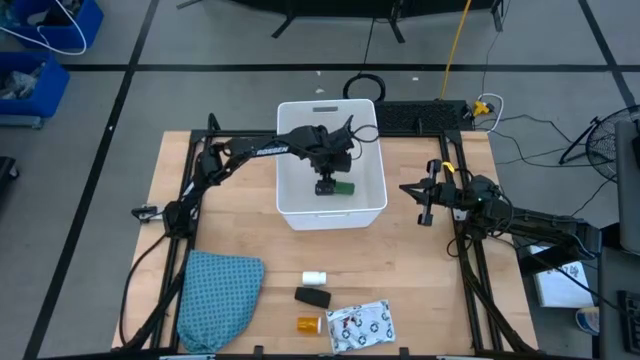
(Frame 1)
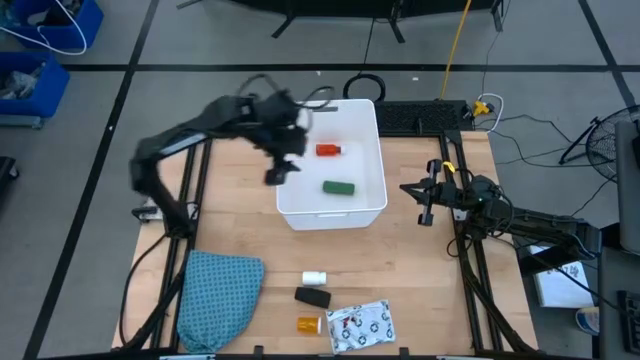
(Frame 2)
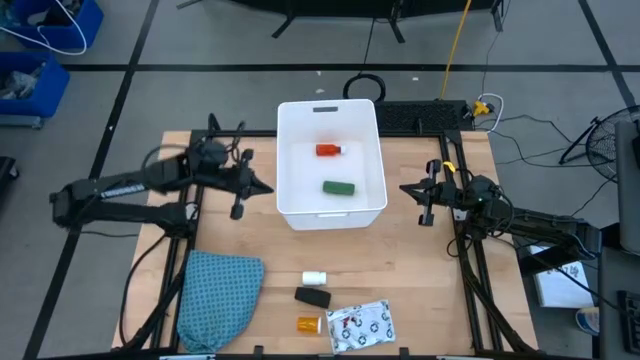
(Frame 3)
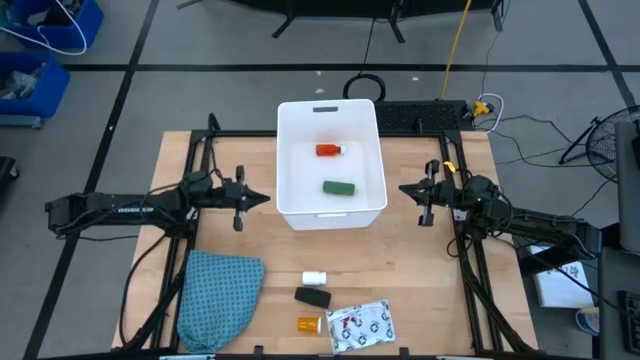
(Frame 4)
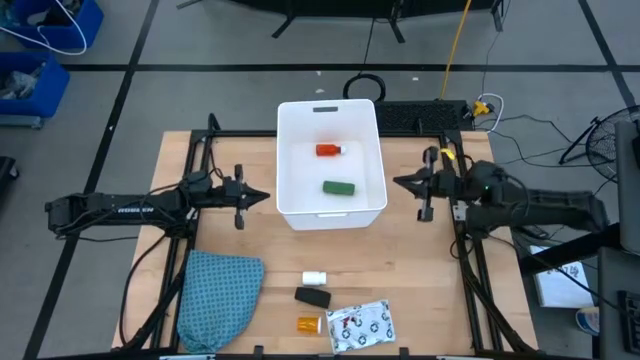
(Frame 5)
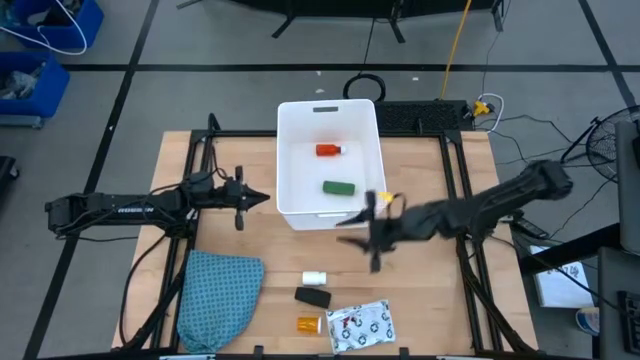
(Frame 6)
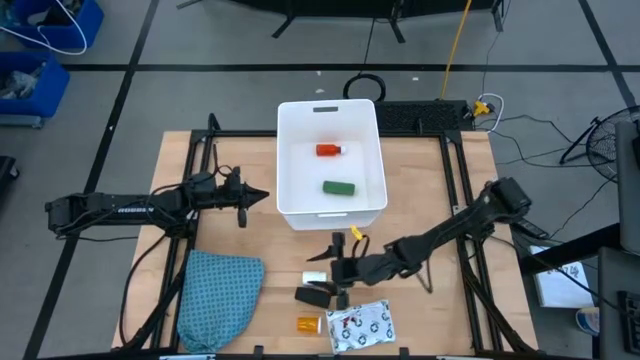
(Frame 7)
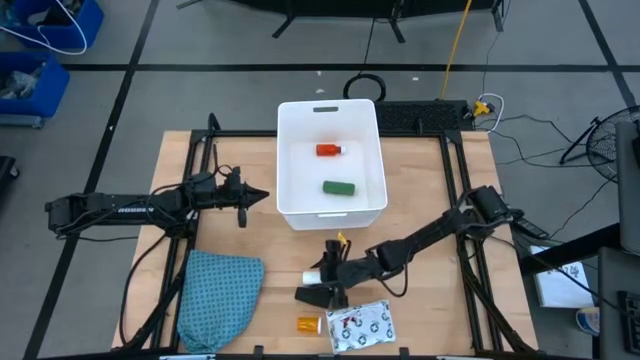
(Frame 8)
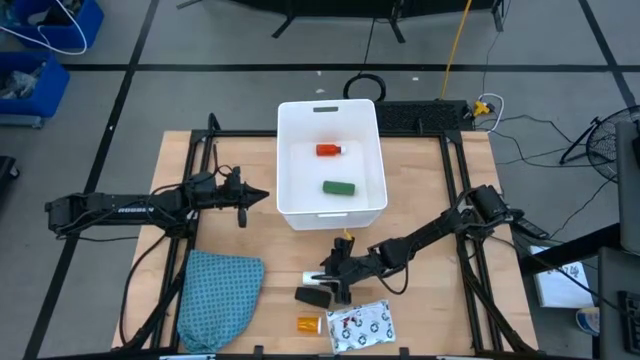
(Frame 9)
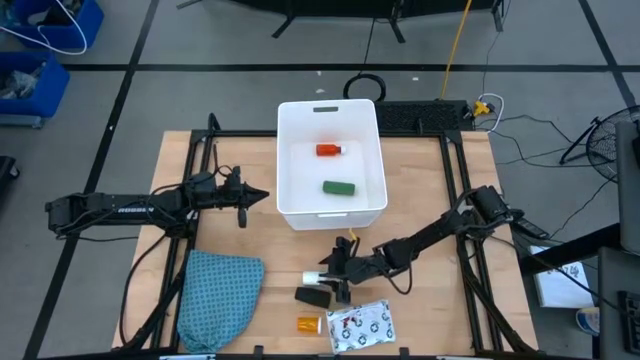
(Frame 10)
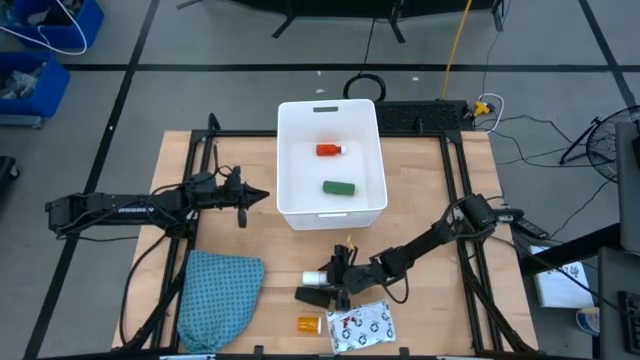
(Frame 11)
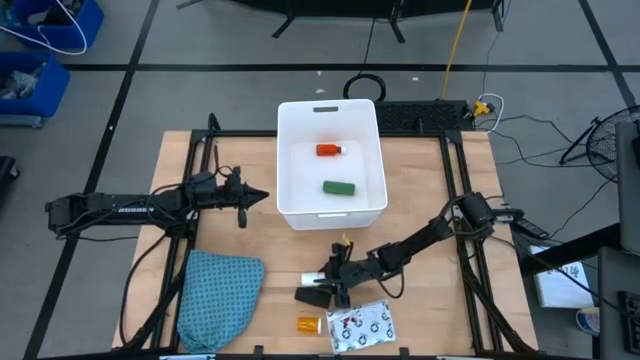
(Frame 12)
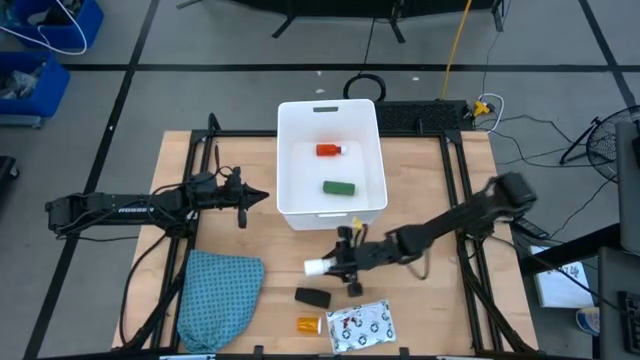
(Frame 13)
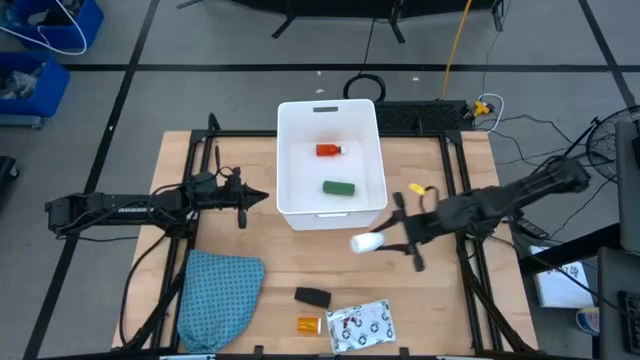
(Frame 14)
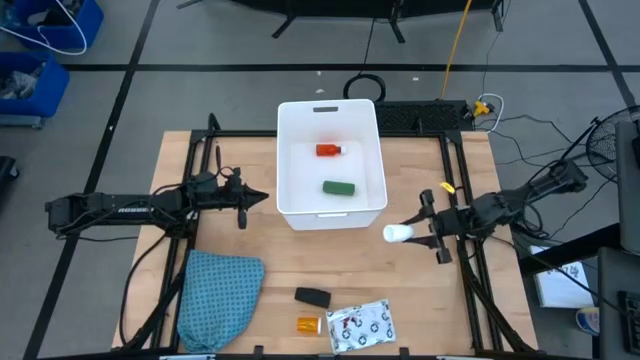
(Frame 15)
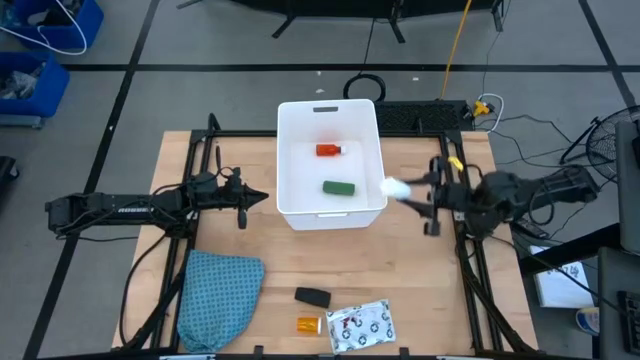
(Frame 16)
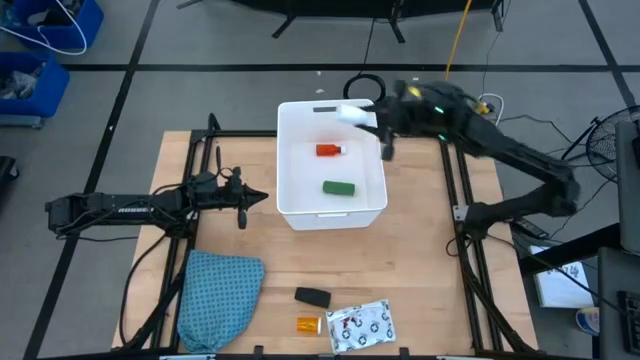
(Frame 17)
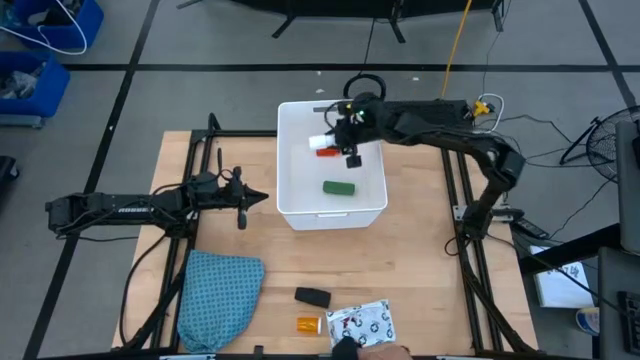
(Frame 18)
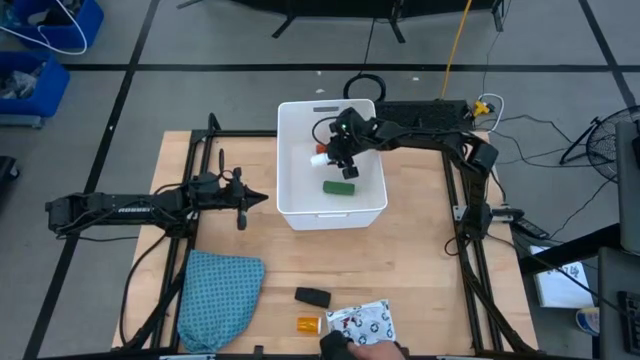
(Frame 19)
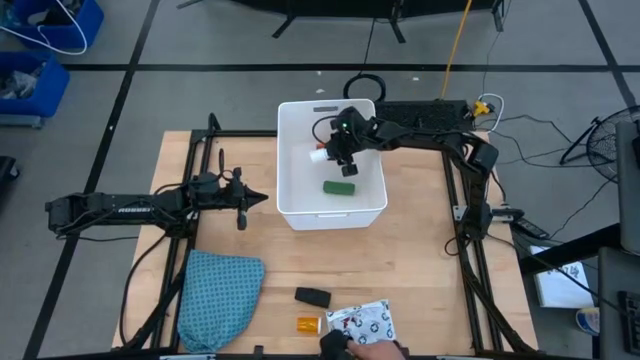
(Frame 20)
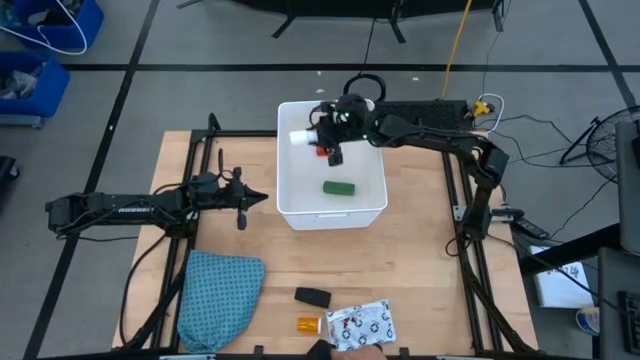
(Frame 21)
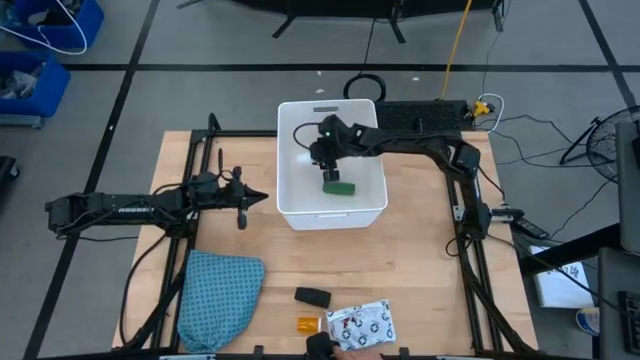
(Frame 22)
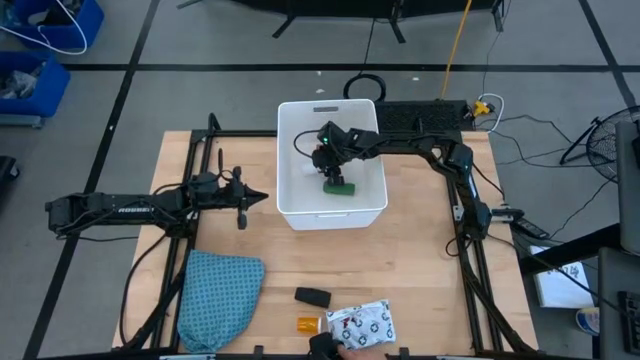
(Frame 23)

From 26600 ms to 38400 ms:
Task: Pick & place medical supplies in basket/bin
Put the white medicine bottle into the white bin

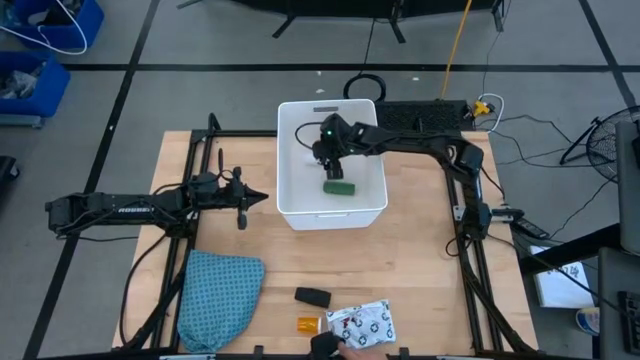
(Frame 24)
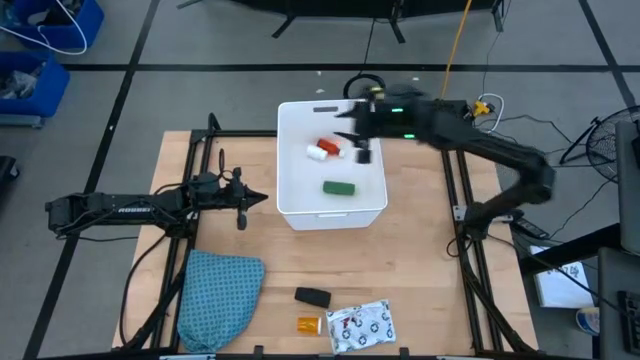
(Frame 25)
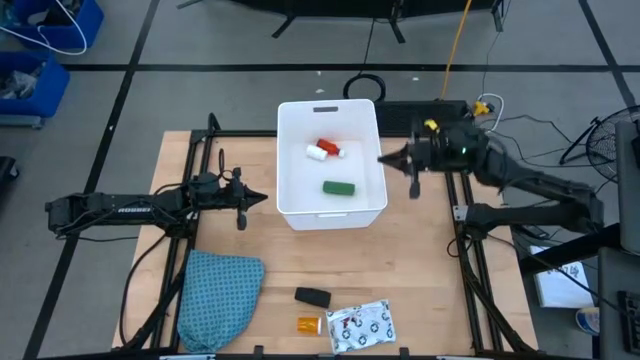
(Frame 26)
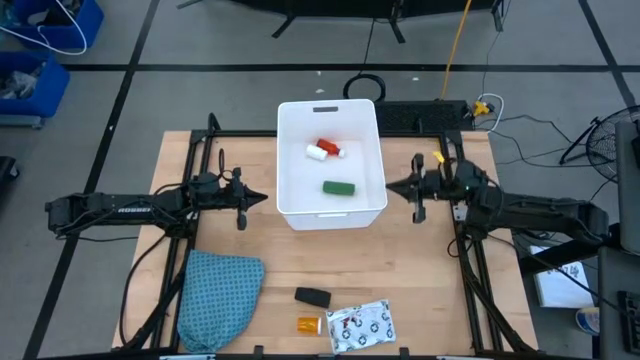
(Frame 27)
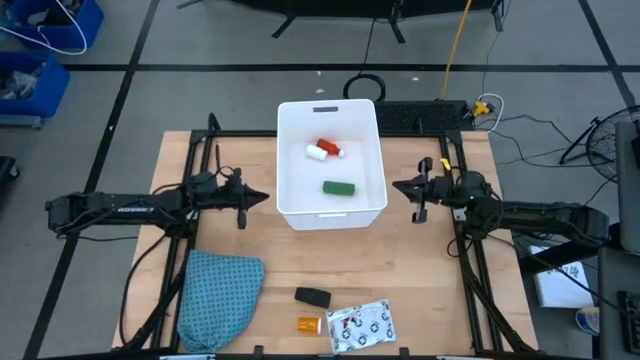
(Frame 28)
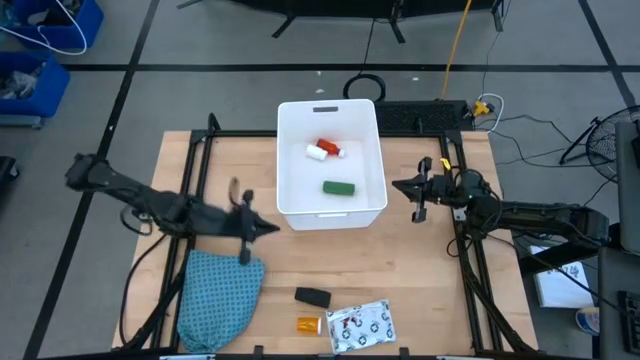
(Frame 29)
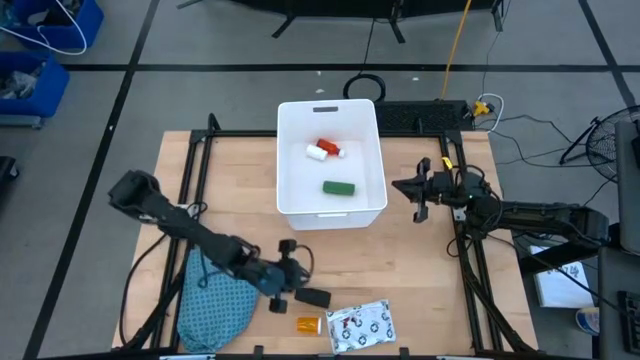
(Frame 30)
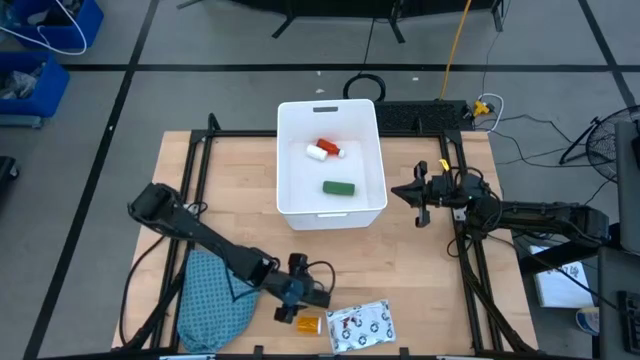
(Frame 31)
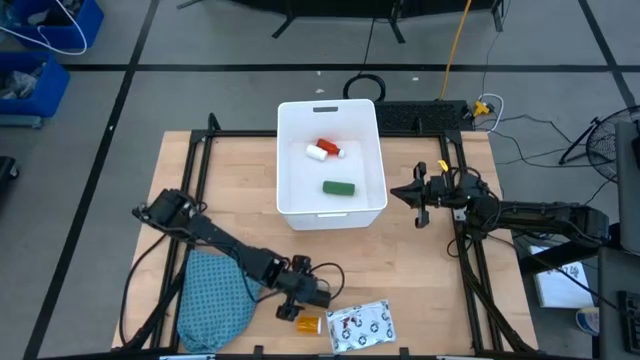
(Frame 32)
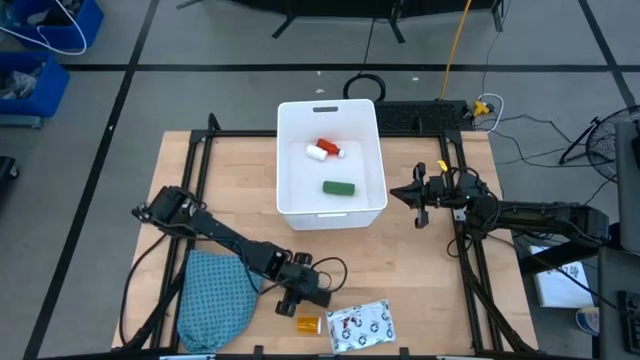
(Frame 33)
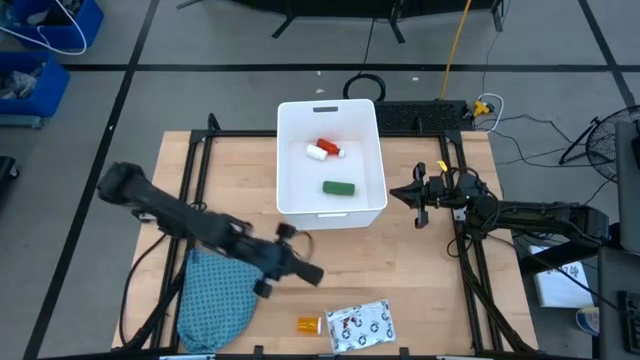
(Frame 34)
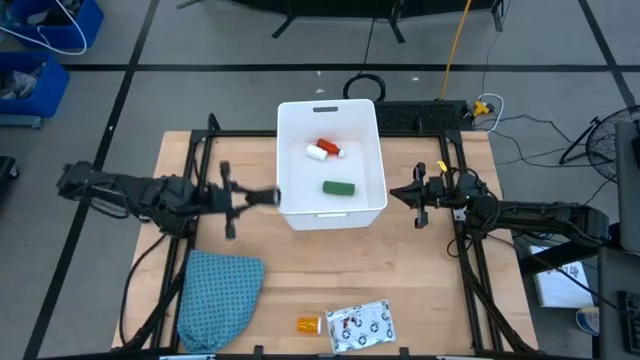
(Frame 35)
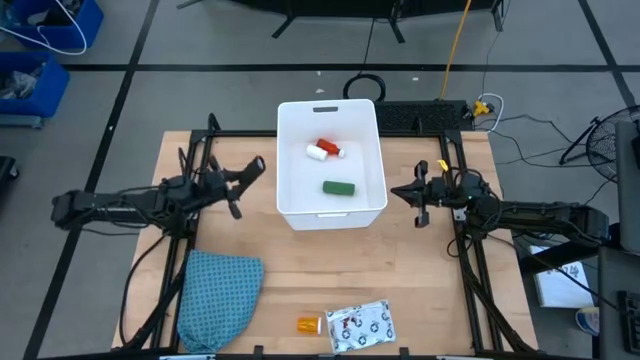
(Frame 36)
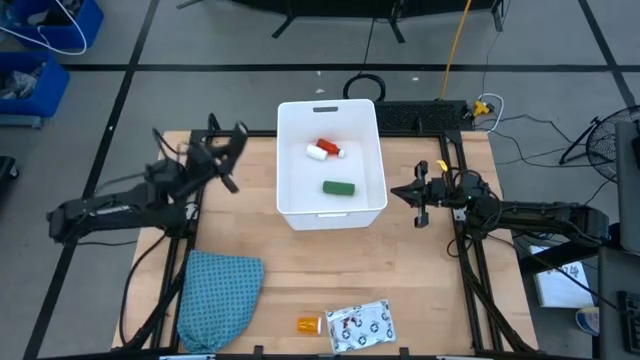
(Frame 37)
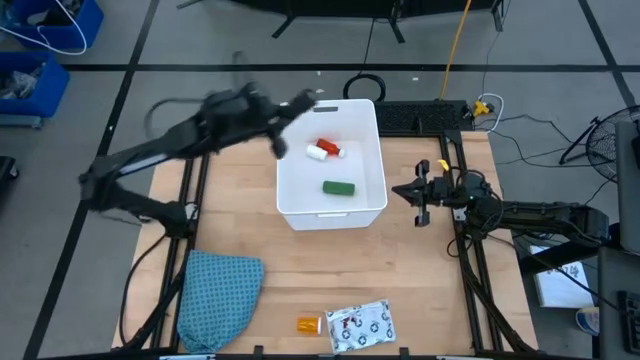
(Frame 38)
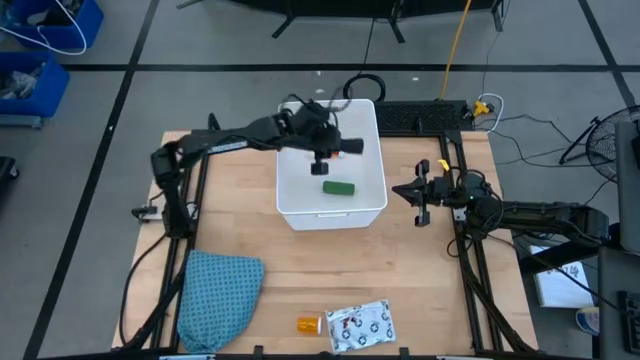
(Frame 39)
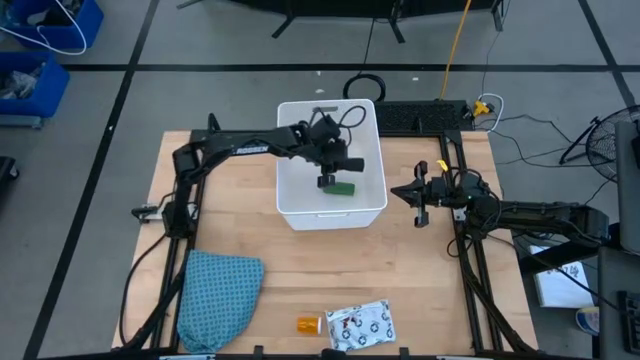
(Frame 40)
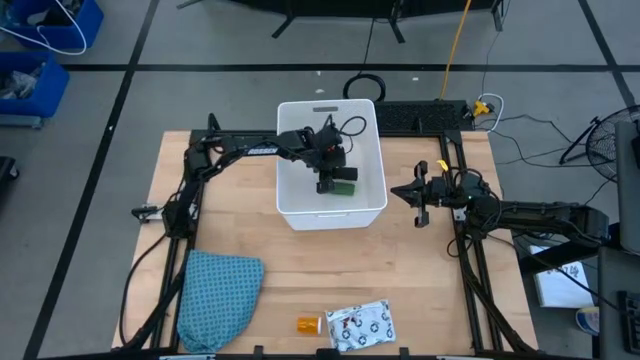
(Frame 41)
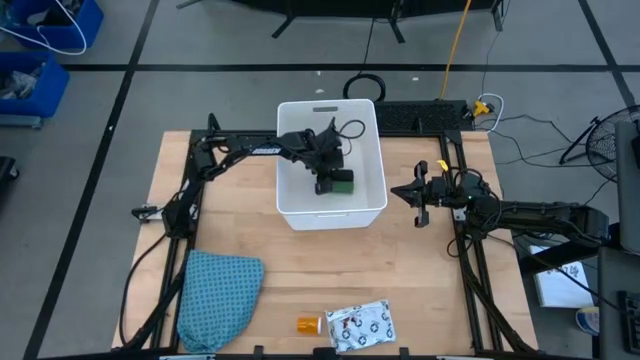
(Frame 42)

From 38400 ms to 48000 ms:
Put the black bandage into the white bin

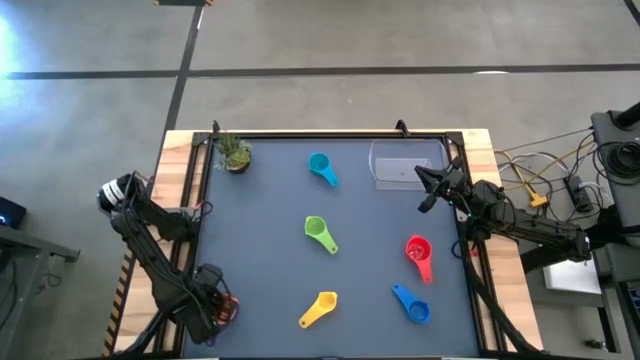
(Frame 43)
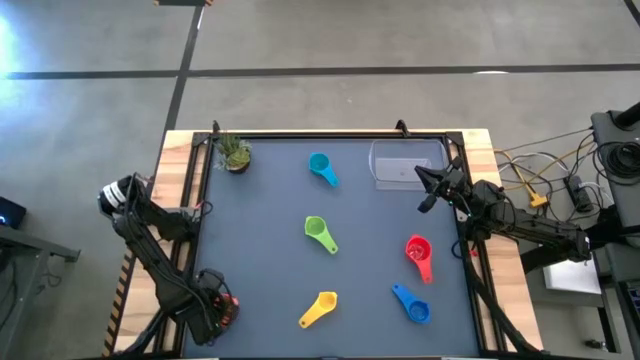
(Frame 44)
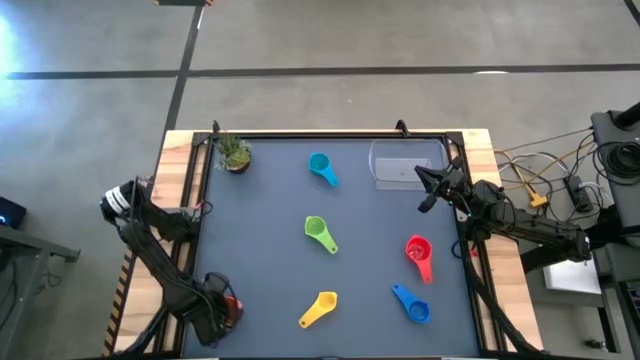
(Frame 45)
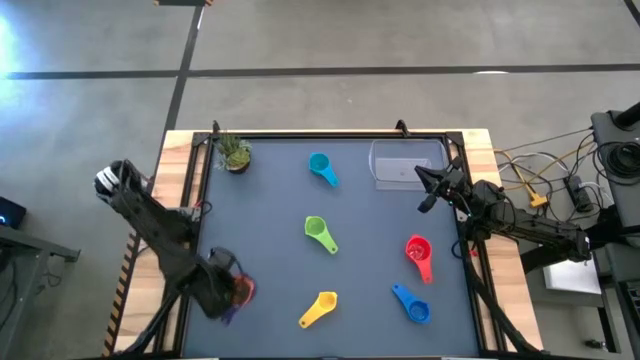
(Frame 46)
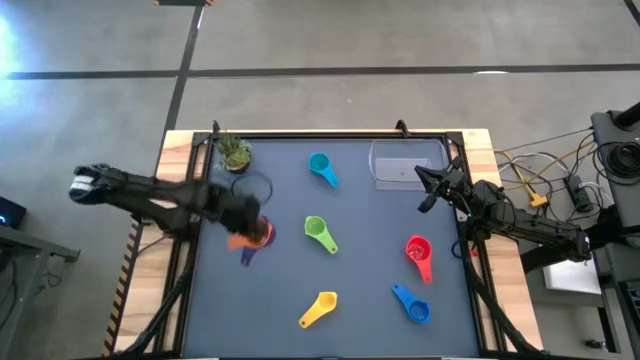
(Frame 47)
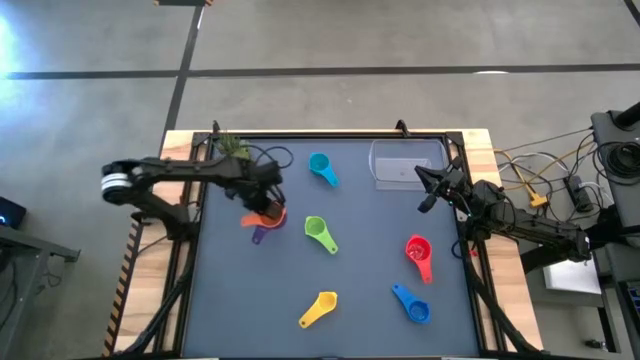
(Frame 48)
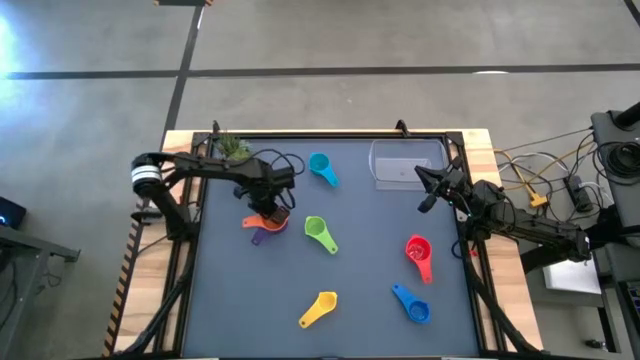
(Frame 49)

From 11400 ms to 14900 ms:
Task: Nest measuring cups in basket
Move the nested measuring cups to the middle left of the table
